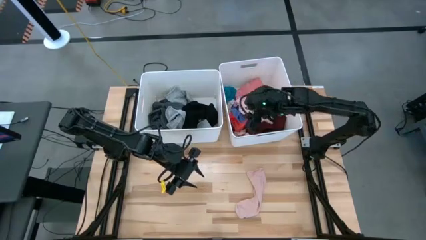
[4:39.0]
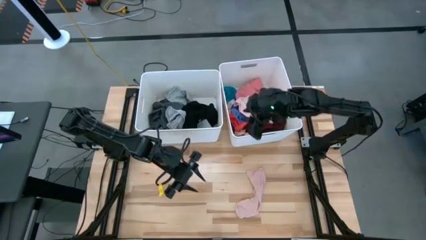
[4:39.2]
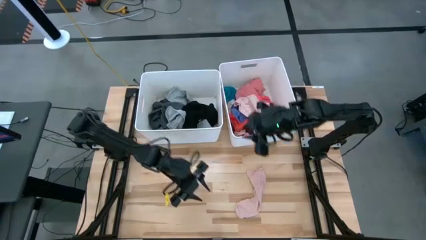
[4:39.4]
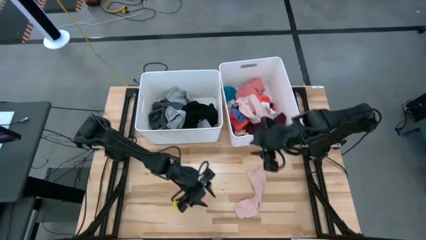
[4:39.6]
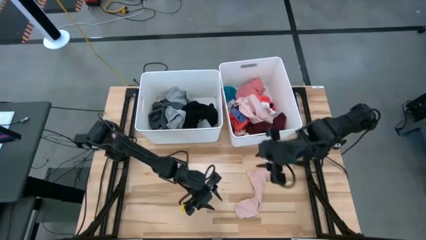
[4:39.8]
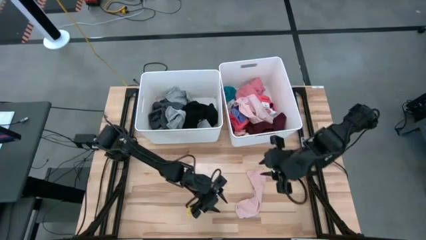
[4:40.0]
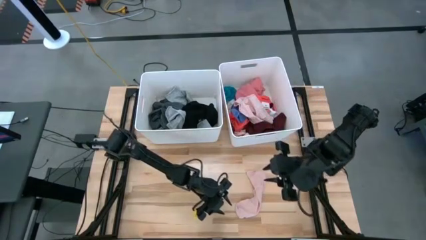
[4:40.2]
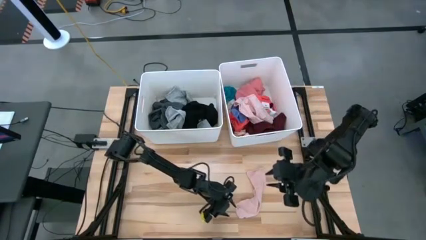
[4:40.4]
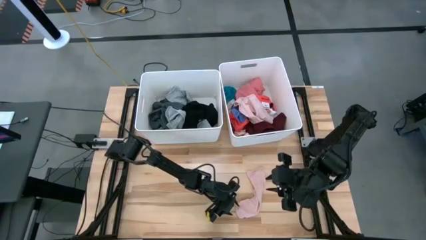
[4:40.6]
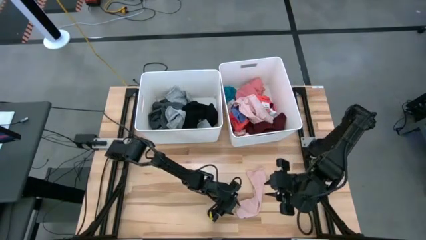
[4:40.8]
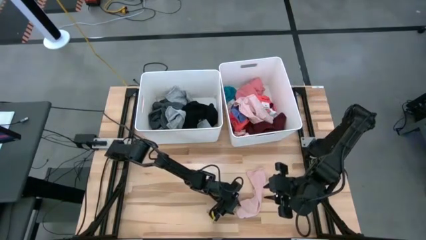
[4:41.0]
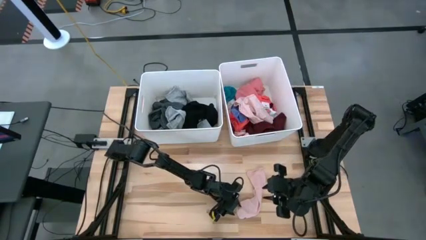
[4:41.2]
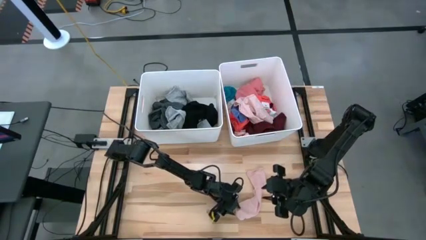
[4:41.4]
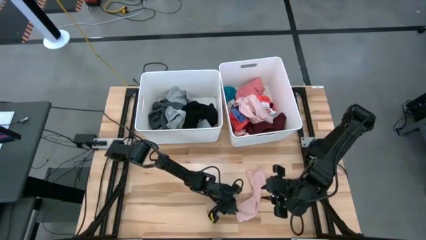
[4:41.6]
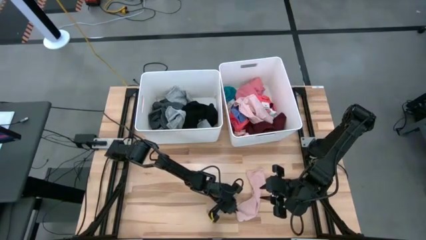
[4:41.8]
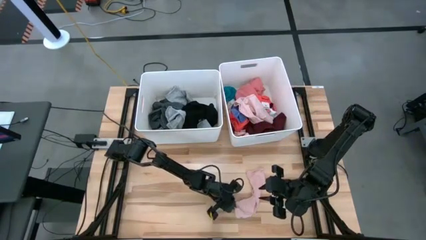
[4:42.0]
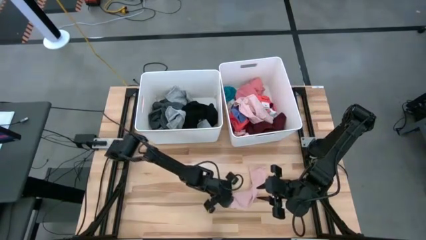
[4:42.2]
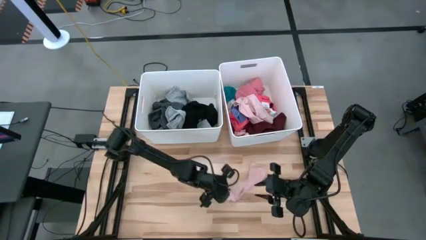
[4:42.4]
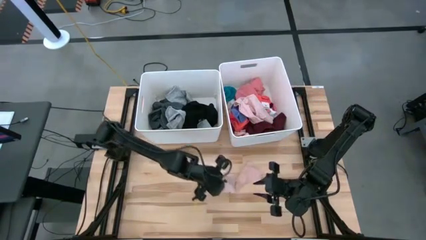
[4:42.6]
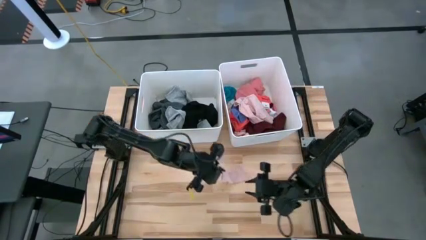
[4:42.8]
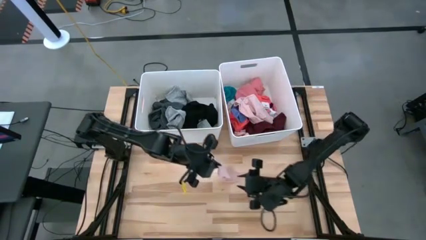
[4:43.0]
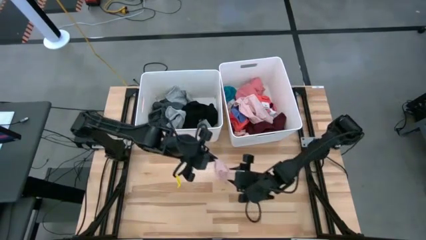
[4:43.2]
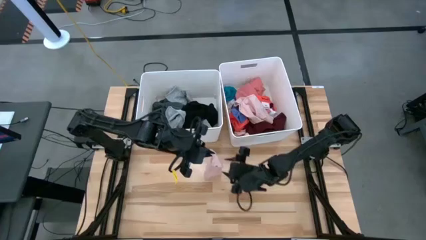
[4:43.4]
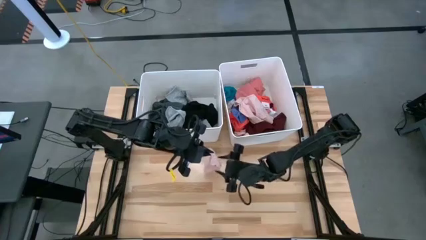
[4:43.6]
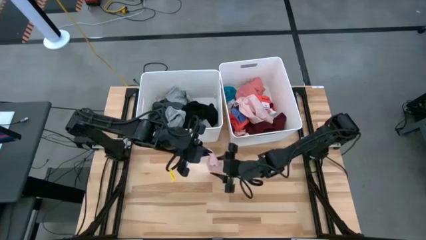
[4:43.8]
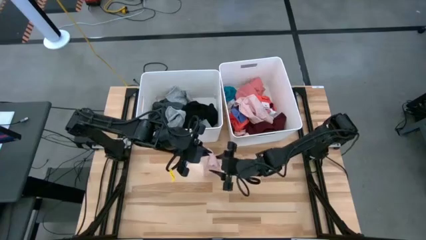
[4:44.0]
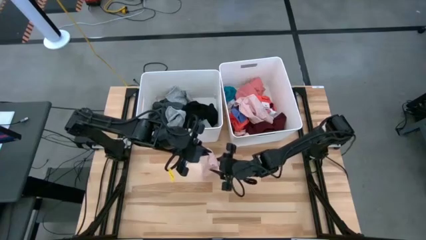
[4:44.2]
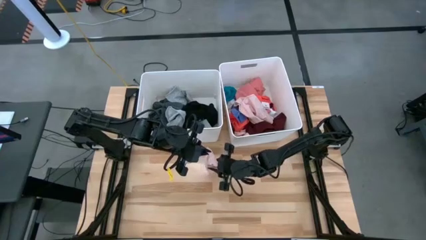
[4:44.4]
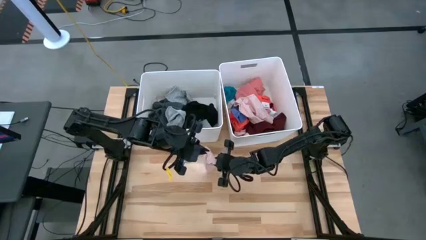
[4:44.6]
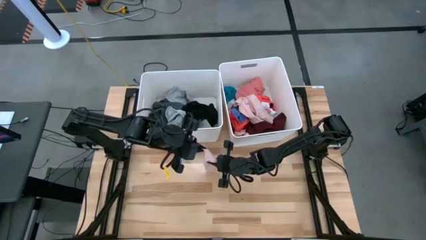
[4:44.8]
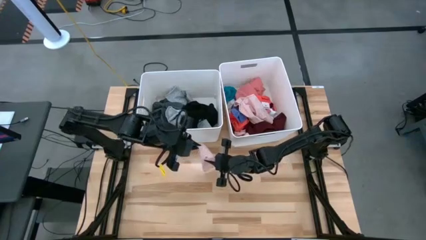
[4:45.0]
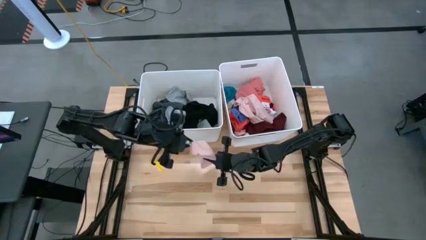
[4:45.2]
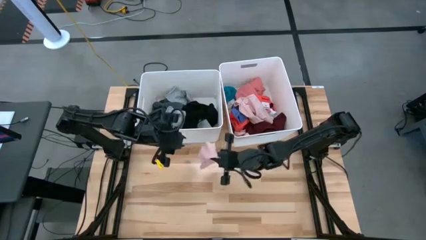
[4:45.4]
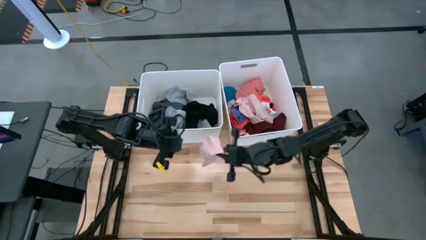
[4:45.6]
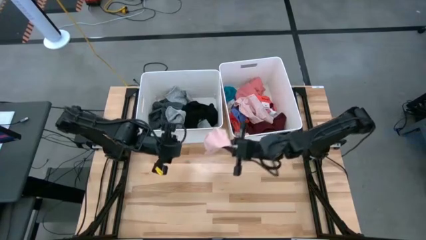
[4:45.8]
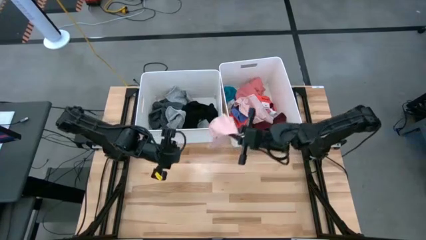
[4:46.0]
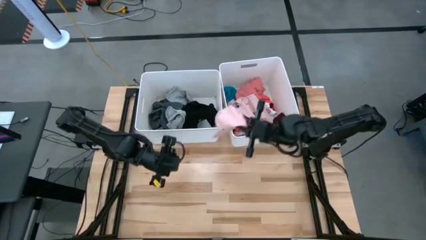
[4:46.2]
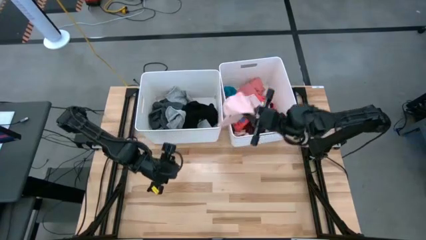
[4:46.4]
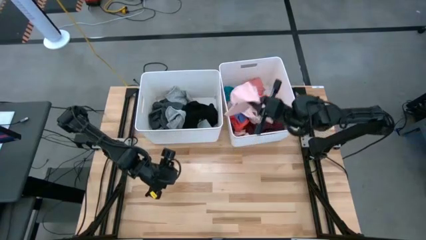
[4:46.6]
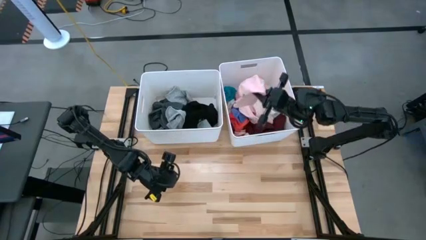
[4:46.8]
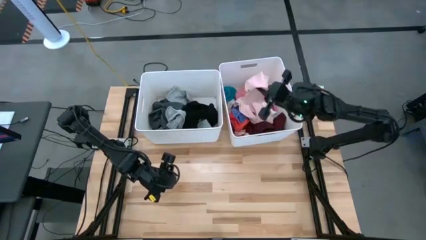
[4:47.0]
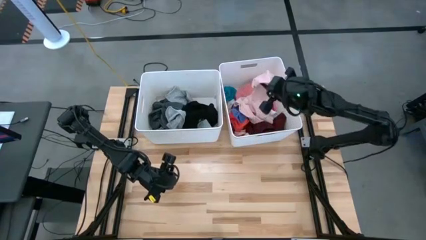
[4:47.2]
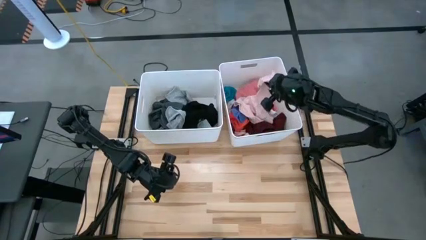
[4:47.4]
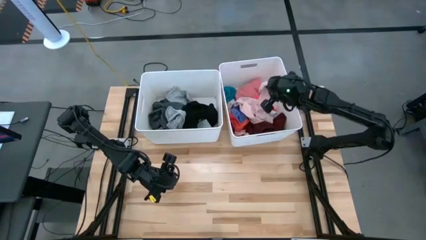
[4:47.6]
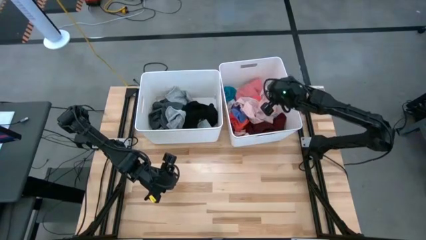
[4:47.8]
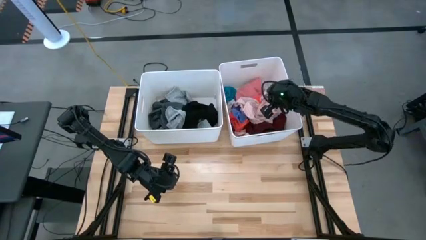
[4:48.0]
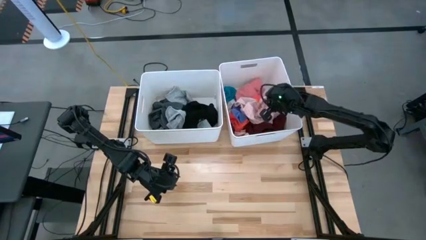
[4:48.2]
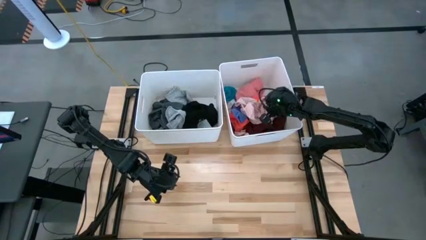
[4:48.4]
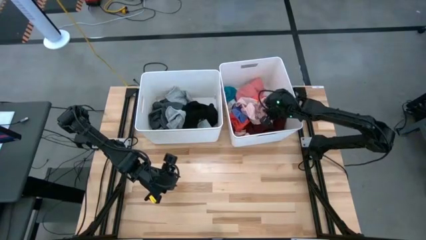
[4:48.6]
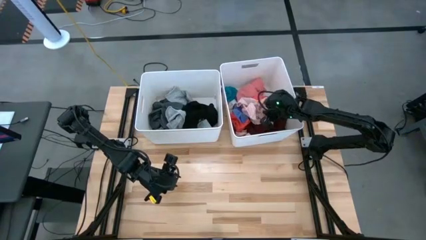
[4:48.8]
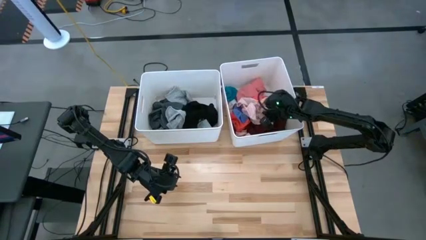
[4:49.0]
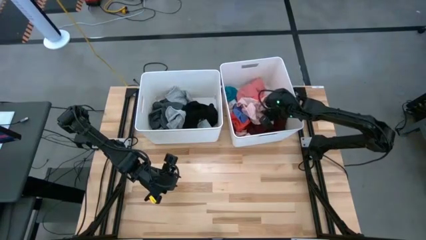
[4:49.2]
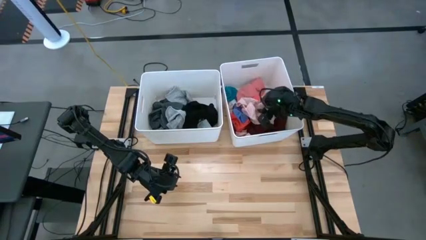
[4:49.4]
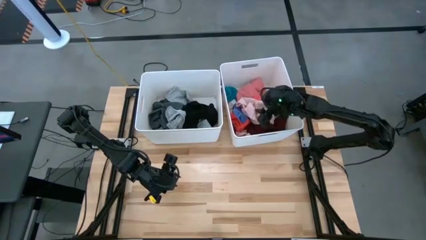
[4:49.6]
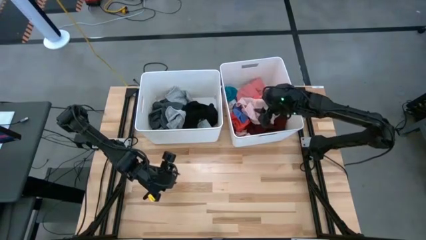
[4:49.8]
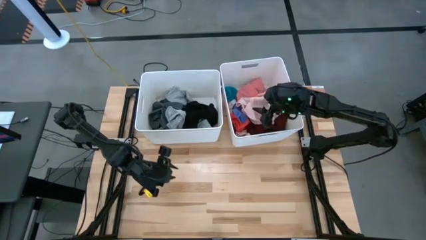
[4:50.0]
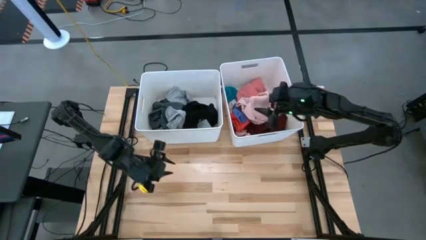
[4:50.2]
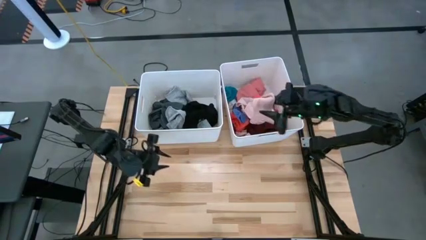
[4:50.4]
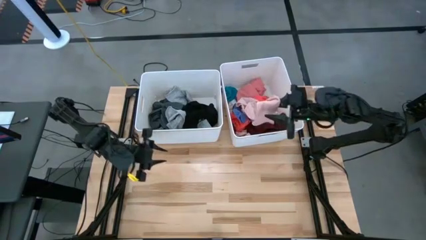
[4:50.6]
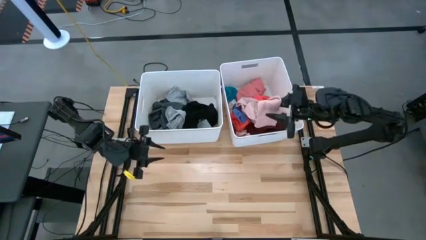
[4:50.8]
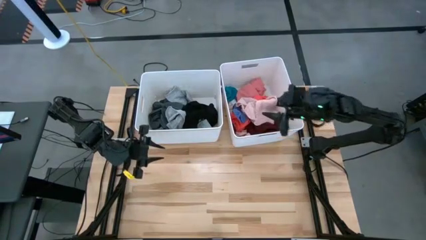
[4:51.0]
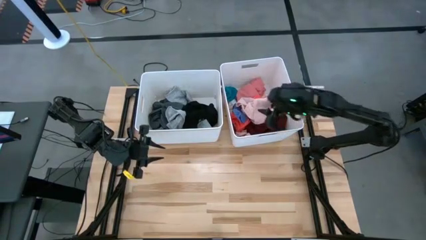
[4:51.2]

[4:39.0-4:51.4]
Task: Sort clothes
Put the pink sock into the right white laundry organizer
